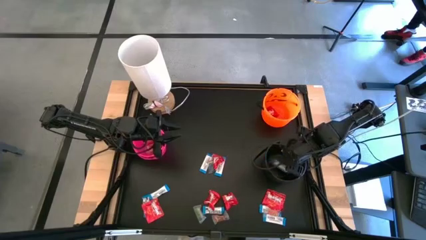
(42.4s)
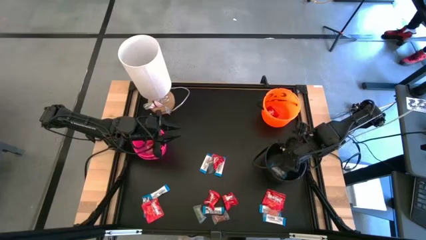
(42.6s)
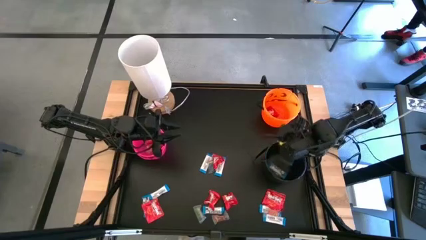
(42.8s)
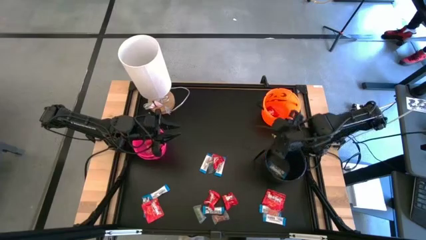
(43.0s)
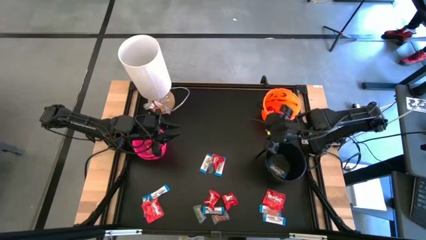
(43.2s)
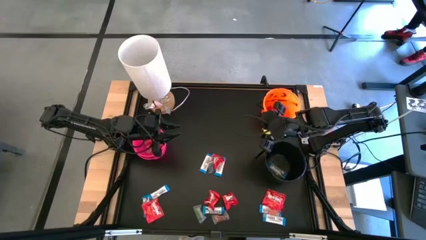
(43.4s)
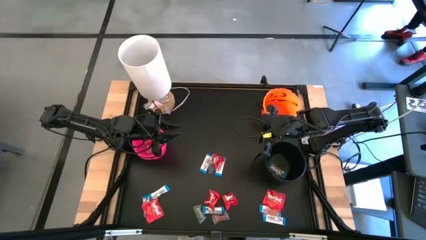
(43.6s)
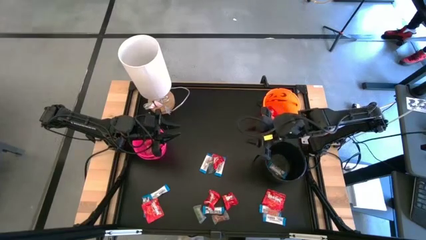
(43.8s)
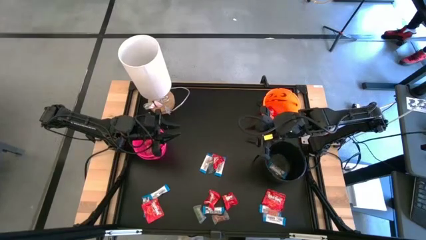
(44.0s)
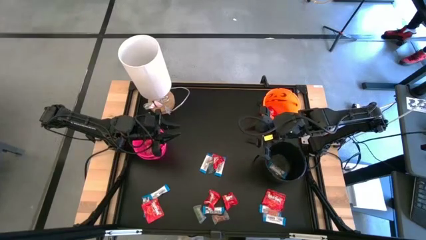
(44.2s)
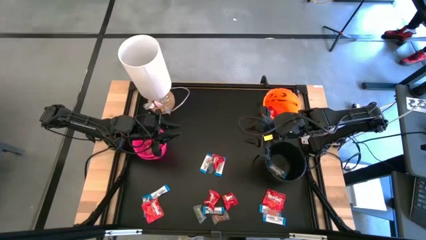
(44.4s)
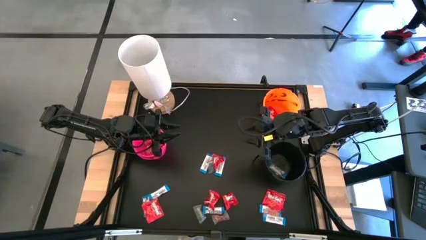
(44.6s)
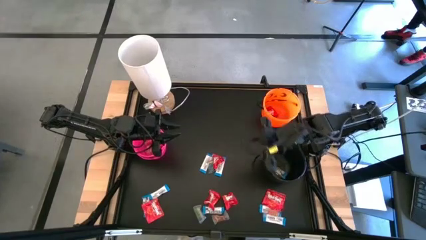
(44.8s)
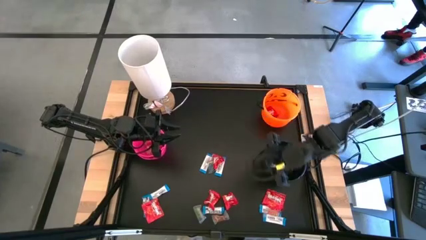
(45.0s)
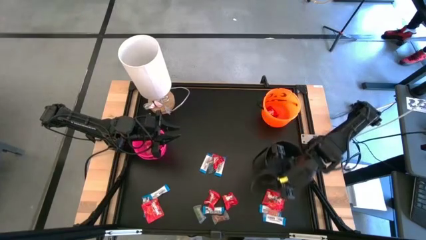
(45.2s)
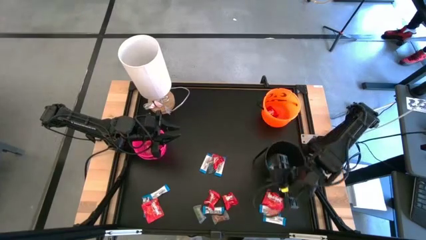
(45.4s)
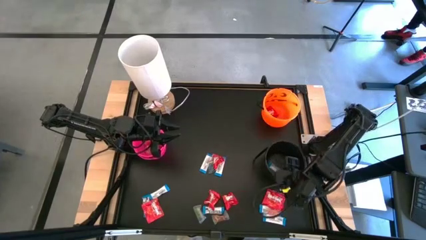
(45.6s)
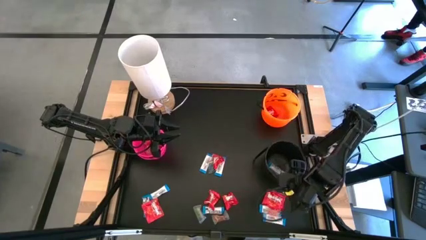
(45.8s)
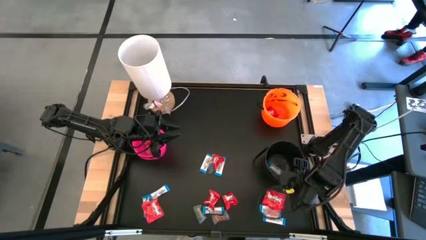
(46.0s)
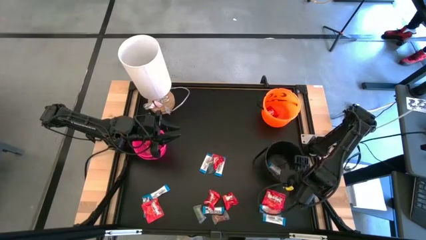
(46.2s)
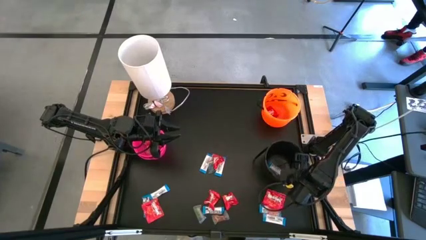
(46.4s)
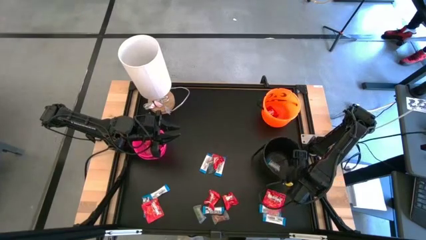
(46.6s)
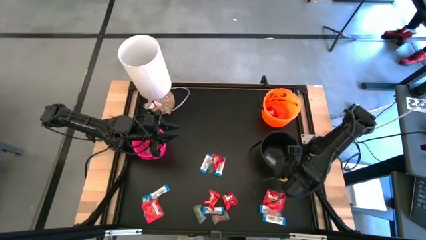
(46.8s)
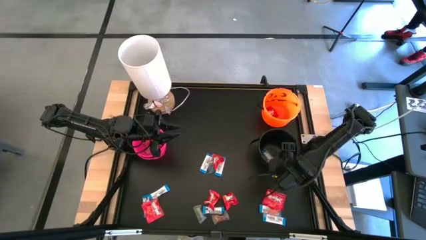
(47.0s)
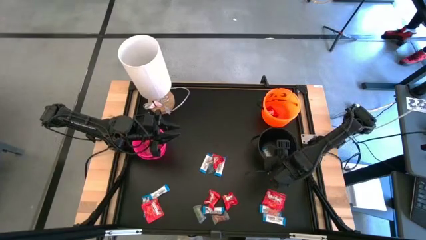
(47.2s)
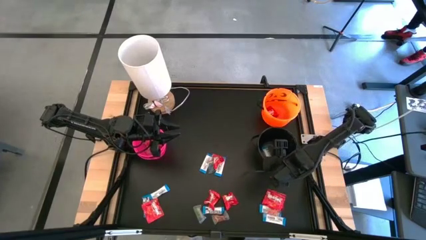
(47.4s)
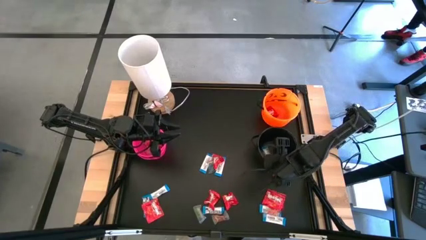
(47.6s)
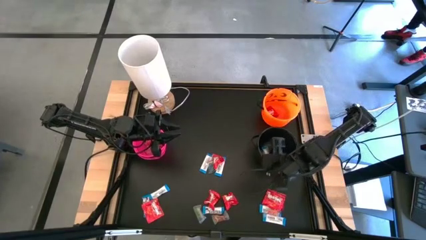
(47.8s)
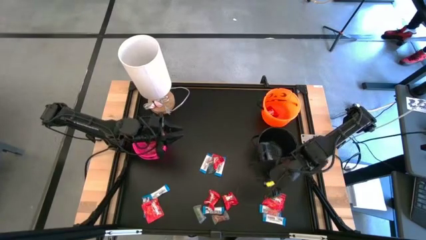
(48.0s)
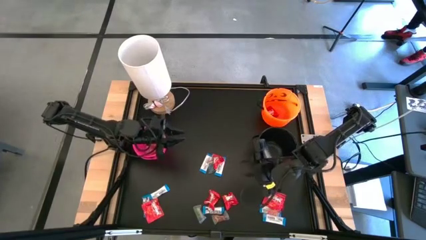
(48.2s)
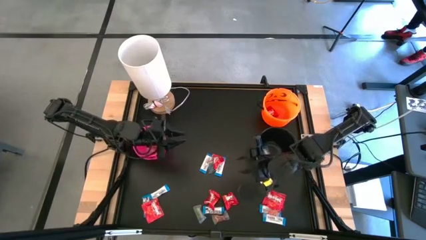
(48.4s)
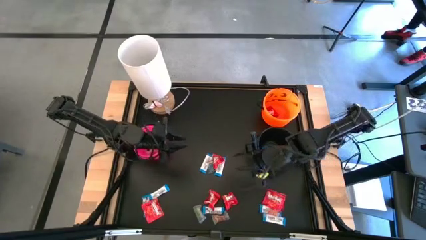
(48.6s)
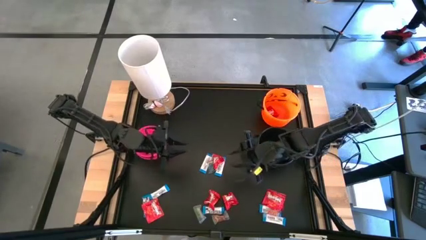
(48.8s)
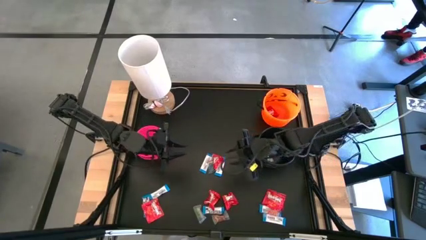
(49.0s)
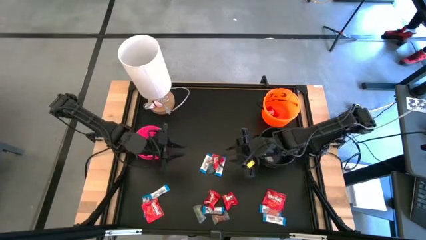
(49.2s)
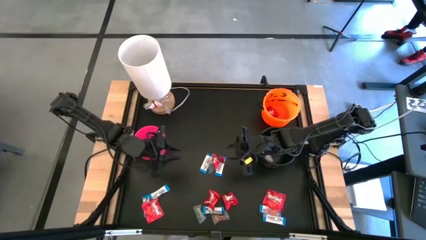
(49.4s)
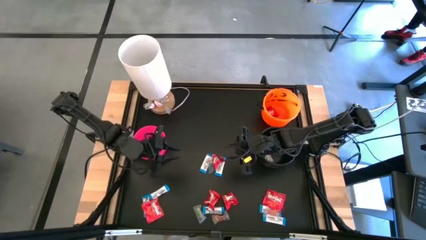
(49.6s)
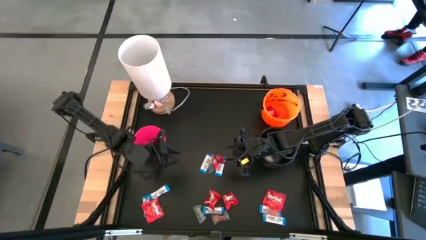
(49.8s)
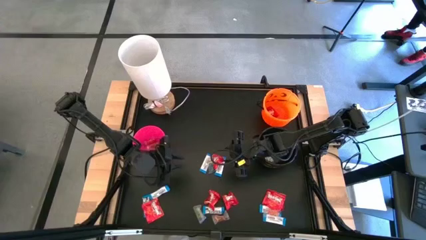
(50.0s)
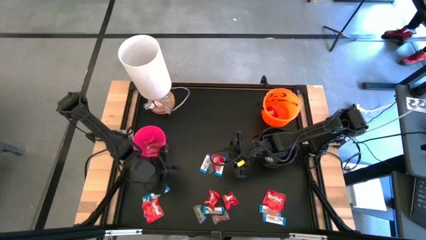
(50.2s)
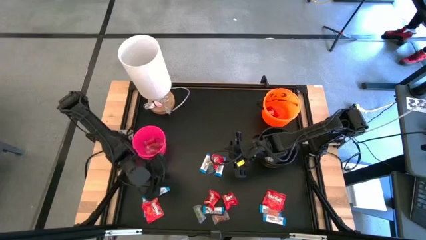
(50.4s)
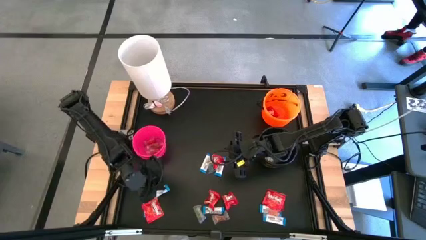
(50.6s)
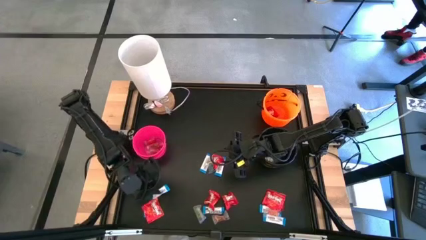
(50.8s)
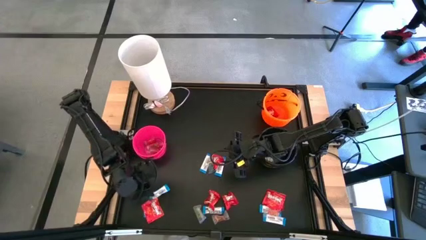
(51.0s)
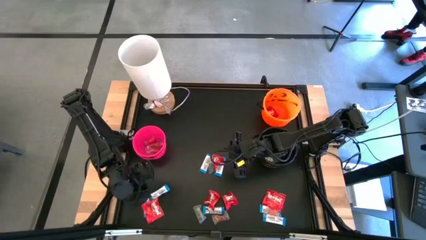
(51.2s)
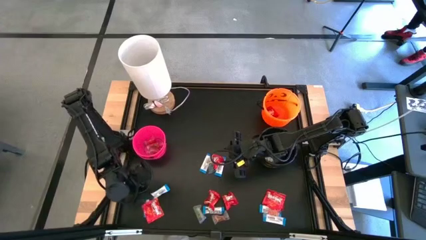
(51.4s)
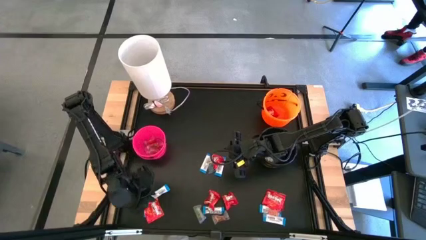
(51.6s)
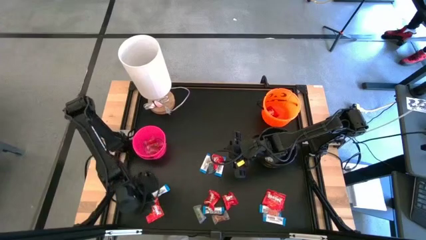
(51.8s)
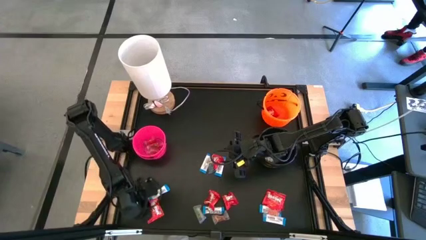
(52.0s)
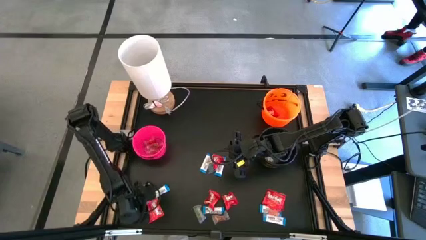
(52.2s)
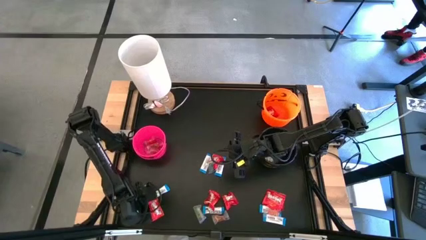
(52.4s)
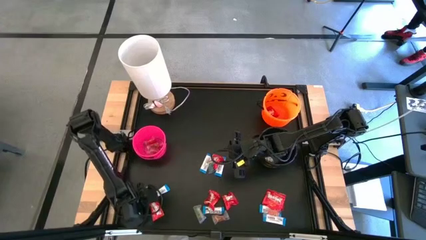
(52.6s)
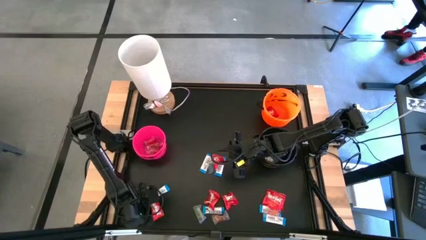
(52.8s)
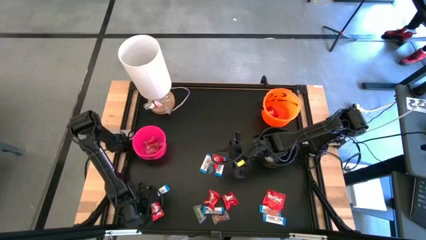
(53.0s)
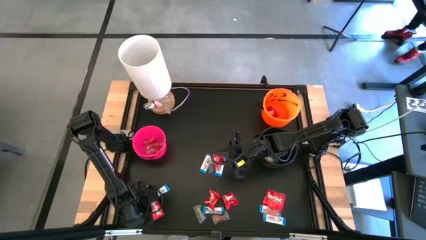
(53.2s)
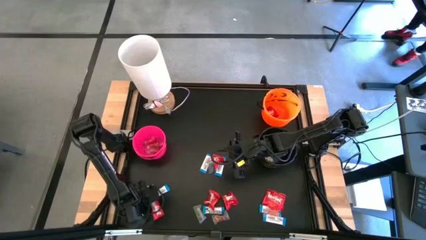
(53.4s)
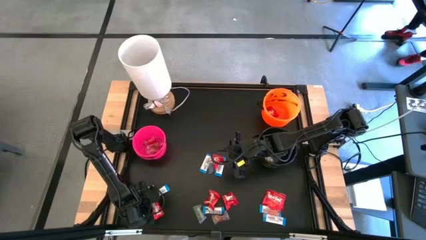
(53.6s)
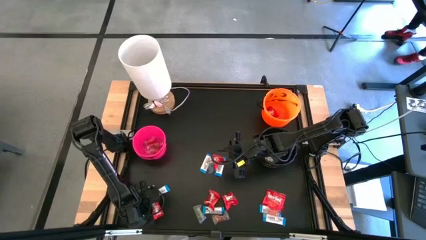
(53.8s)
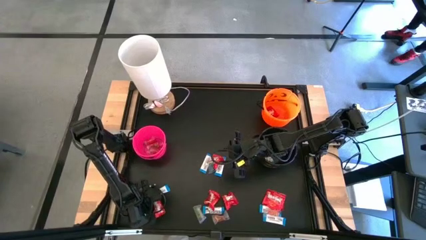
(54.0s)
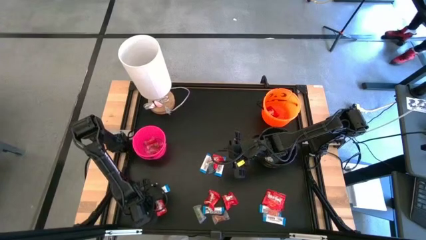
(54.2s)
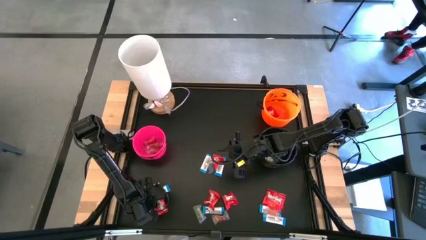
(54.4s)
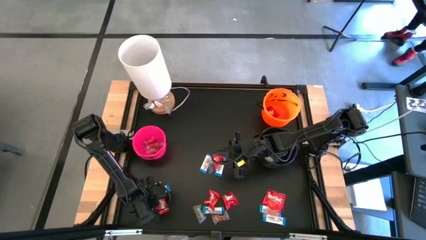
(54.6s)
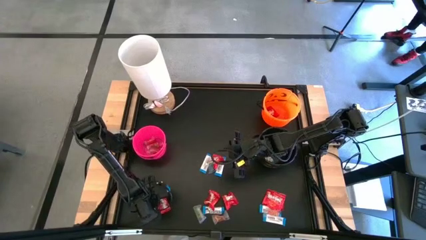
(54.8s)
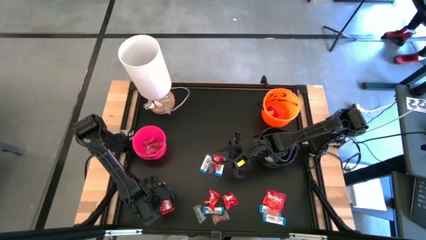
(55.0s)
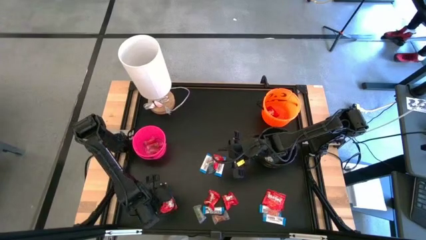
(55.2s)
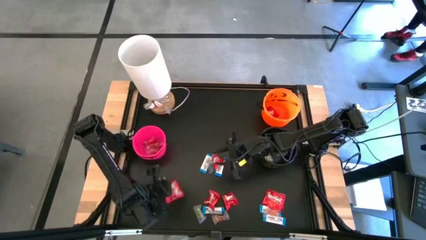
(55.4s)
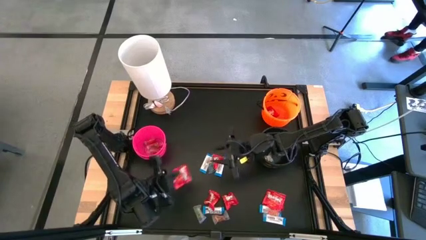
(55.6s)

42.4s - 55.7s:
Task: Sort candy
Put the red candy into the orange bucket

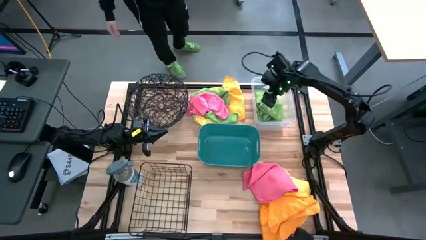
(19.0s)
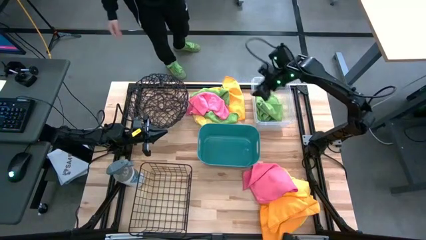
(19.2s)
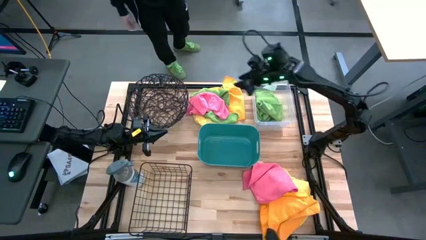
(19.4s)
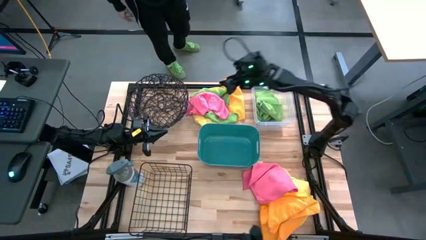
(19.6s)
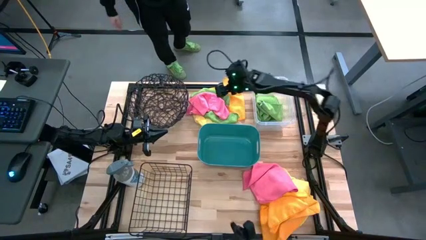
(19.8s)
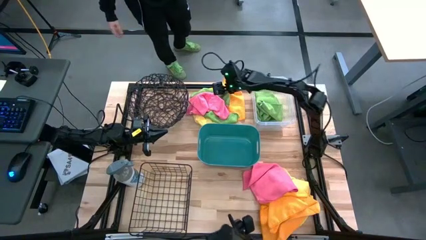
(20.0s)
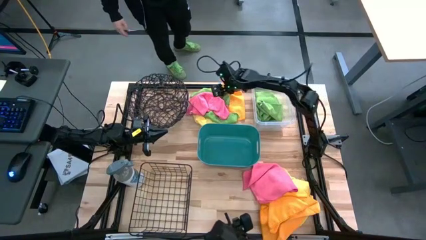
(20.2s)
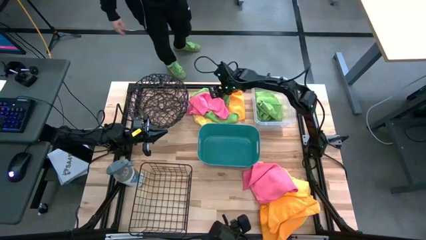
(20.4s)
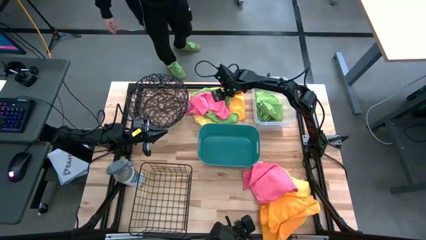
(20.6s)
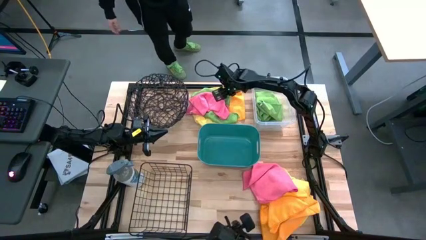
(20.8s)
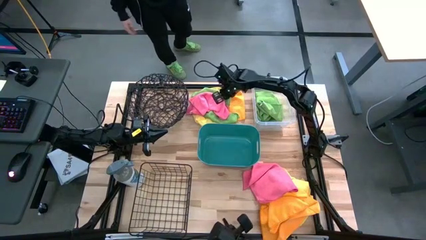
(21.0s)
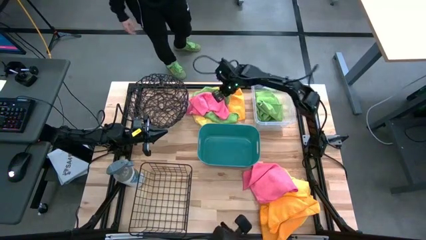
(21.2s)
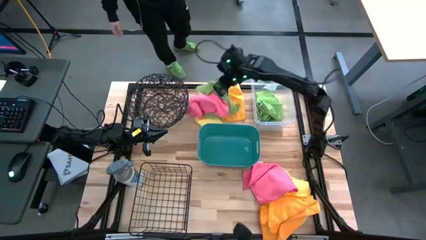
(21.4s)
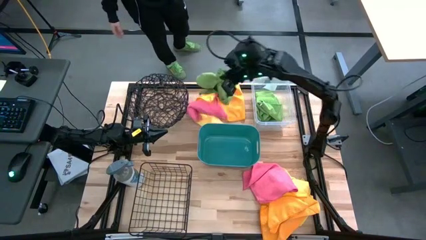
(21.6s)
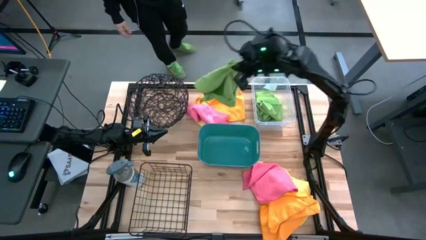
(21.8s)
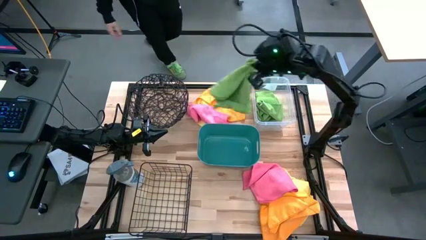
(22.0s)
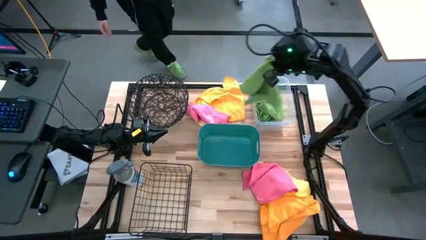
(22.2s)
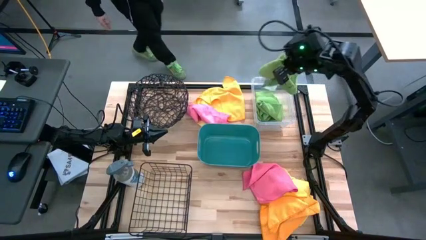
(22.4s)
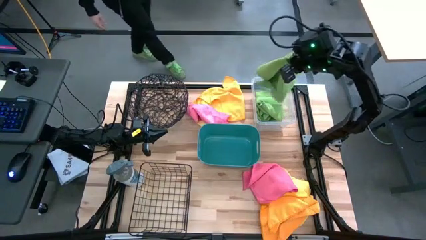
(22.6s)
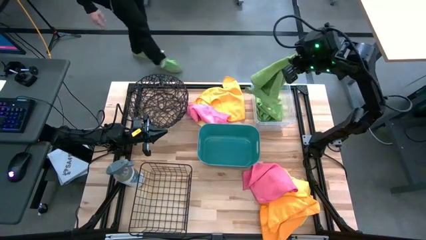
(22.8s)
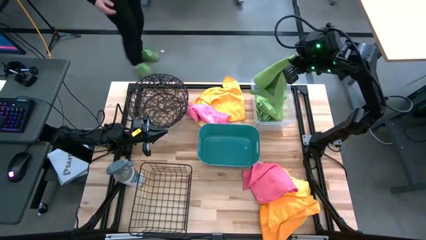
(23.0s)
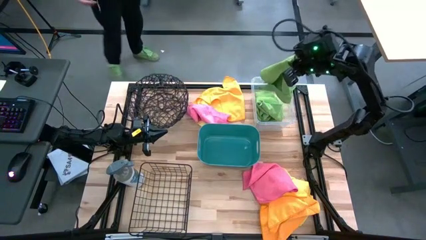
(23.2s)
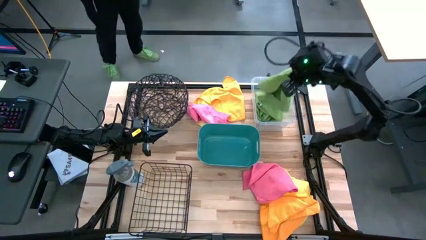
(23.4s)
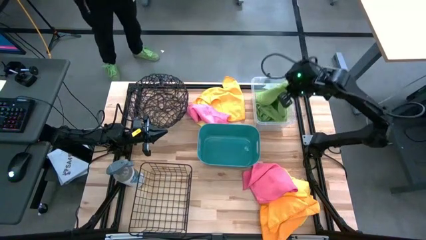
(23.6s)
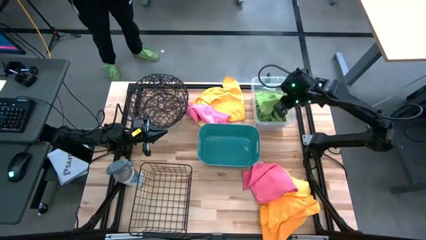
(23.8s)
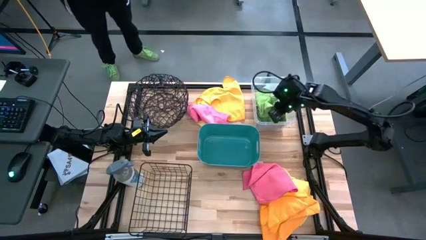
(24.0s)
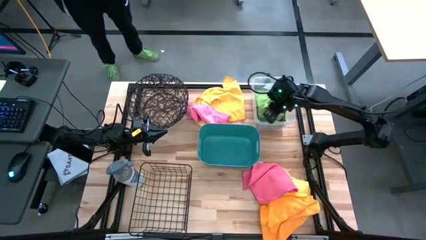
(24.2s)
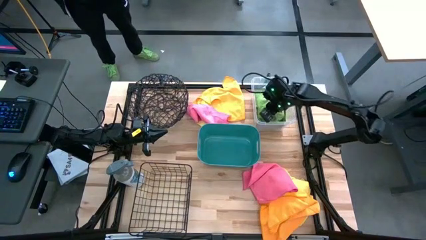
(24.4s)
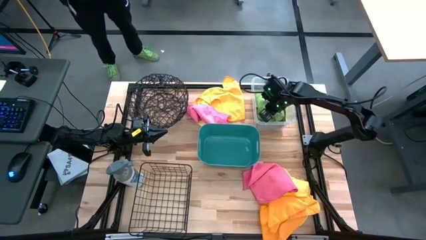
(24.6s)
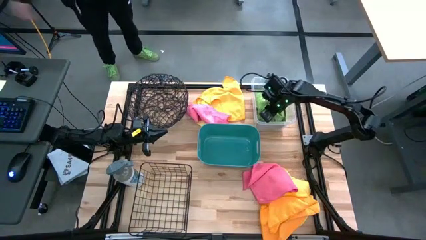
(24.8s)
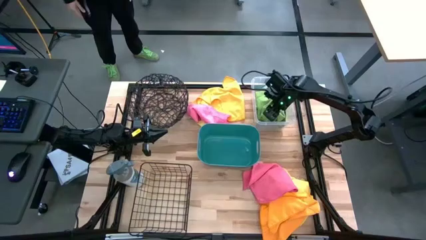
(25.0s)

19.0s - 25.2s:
Task: Sort microfiber towel by color & place in baskets
Put the green microfiber cloth into the transparent bin
